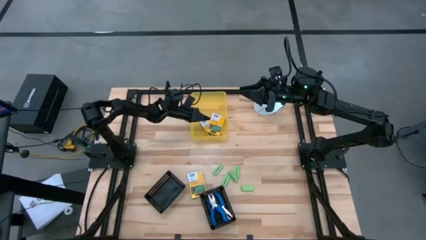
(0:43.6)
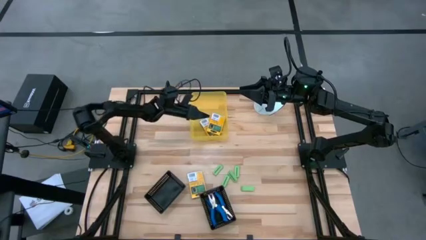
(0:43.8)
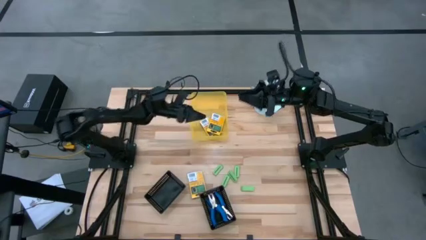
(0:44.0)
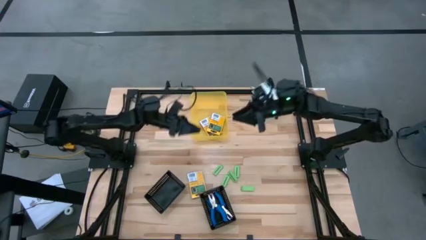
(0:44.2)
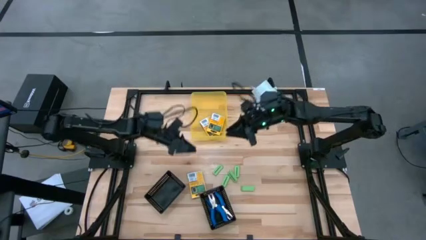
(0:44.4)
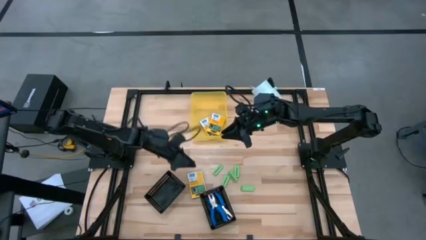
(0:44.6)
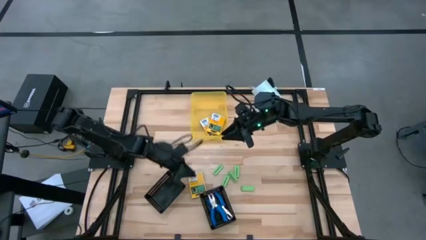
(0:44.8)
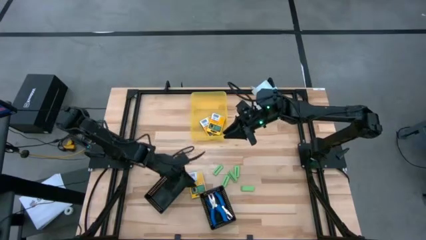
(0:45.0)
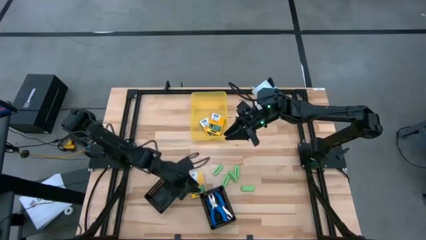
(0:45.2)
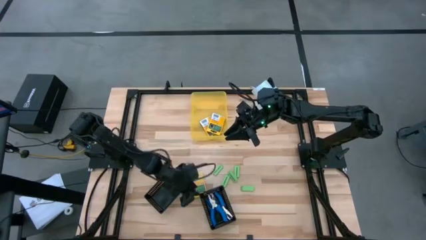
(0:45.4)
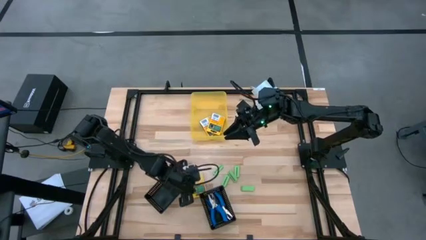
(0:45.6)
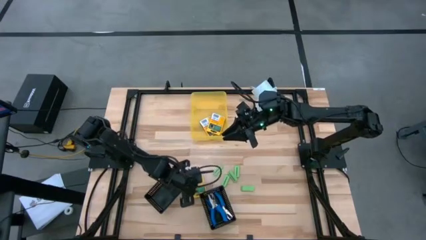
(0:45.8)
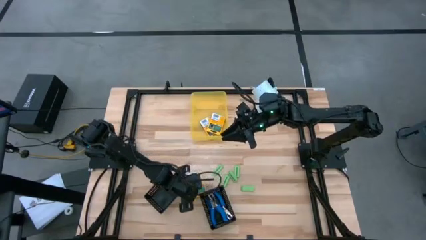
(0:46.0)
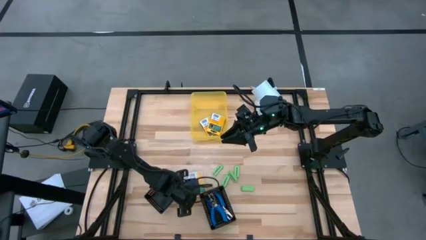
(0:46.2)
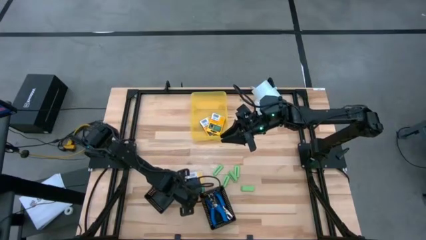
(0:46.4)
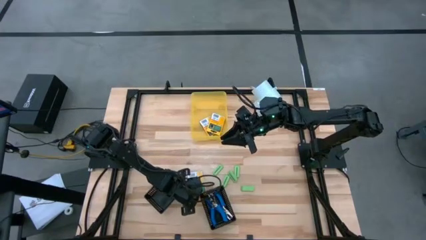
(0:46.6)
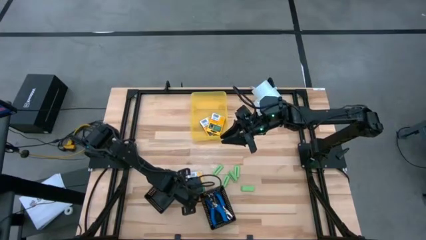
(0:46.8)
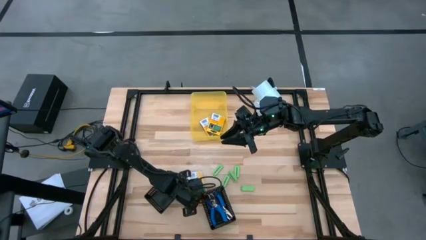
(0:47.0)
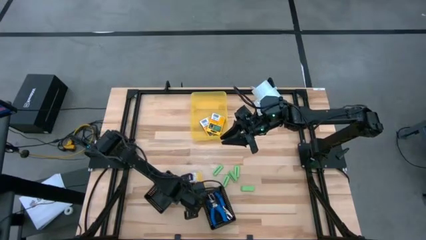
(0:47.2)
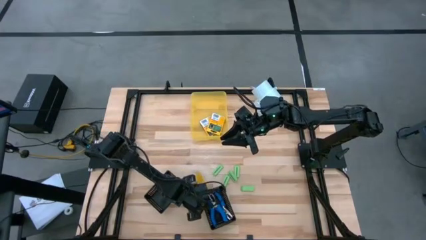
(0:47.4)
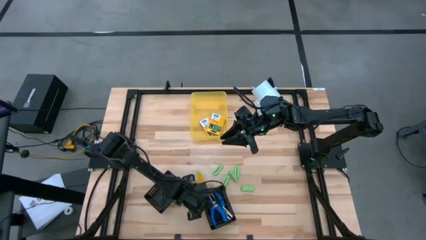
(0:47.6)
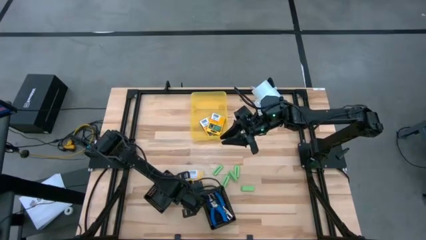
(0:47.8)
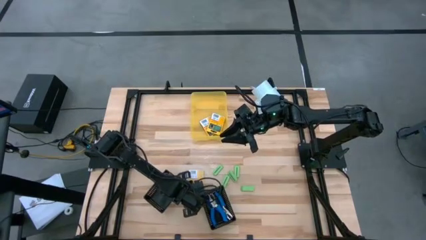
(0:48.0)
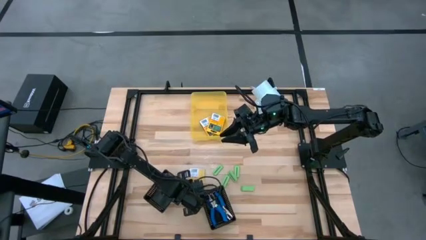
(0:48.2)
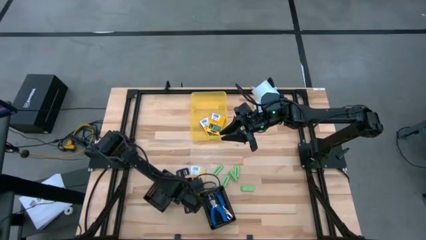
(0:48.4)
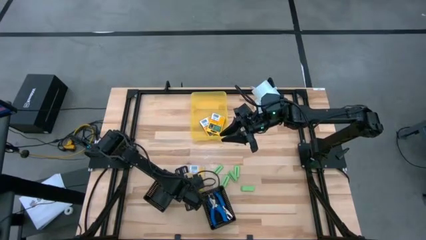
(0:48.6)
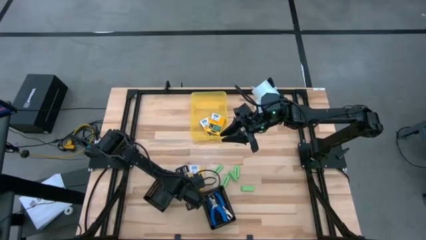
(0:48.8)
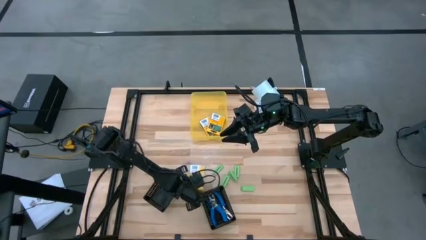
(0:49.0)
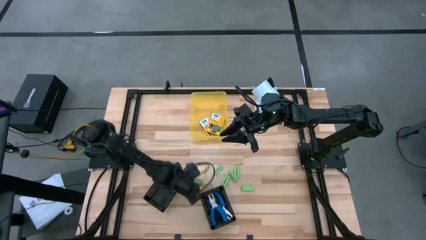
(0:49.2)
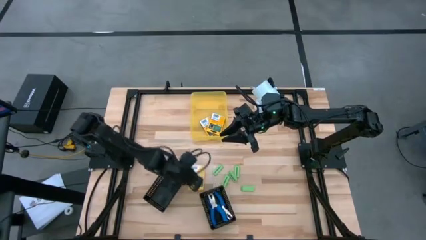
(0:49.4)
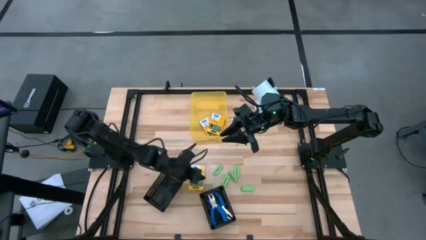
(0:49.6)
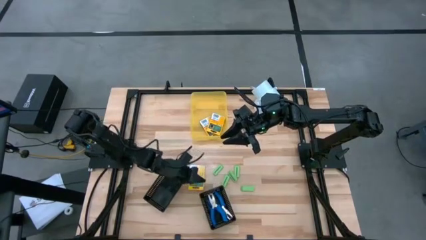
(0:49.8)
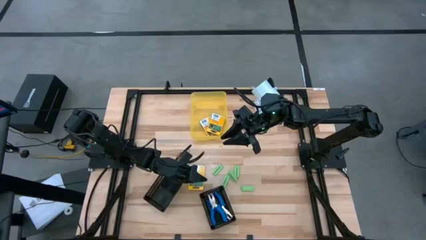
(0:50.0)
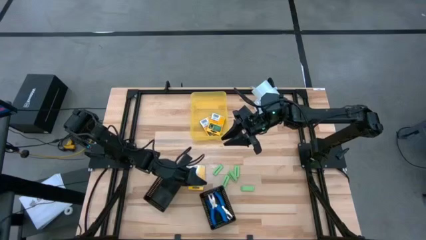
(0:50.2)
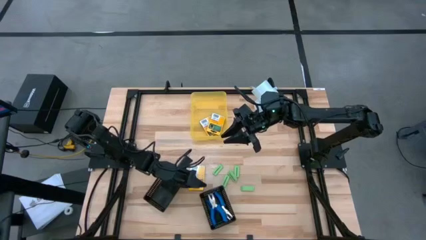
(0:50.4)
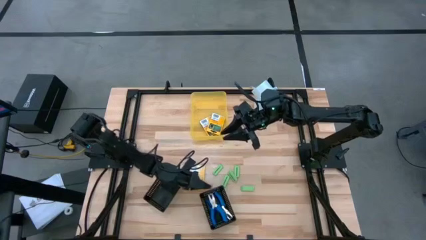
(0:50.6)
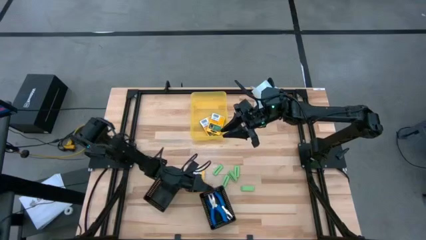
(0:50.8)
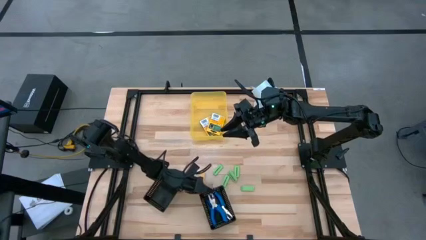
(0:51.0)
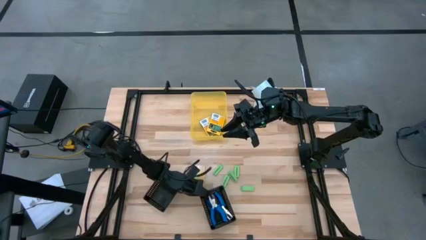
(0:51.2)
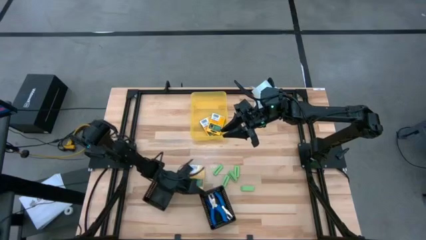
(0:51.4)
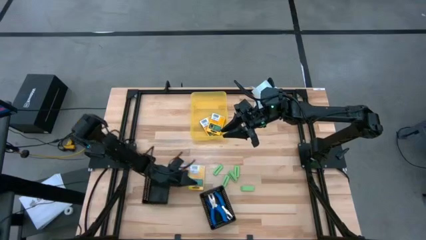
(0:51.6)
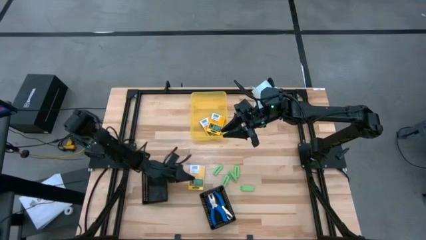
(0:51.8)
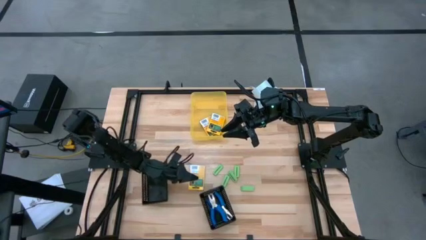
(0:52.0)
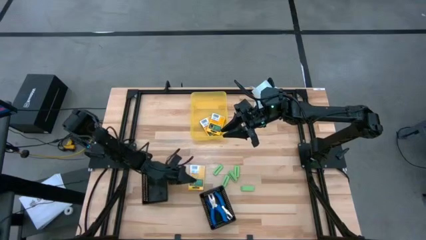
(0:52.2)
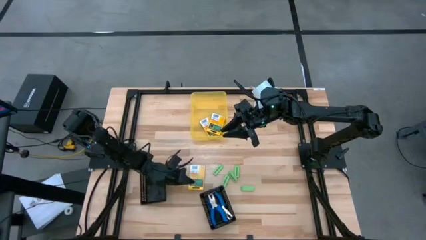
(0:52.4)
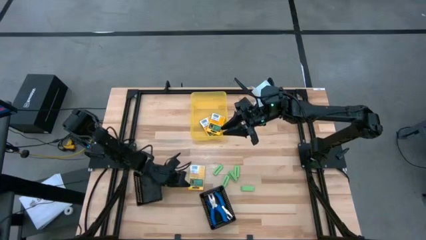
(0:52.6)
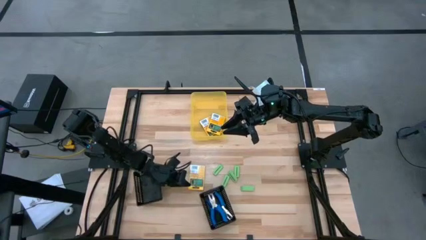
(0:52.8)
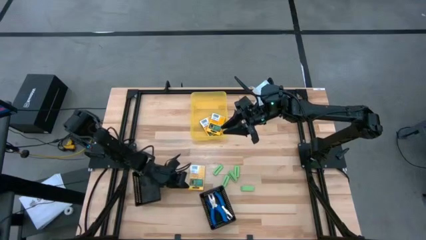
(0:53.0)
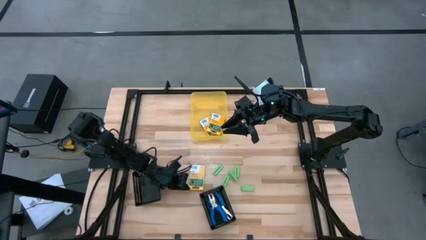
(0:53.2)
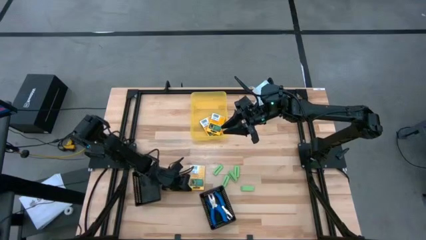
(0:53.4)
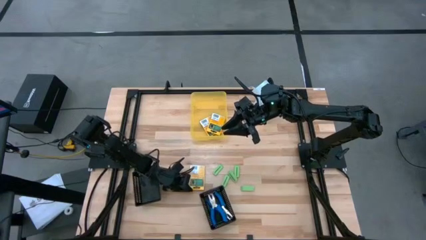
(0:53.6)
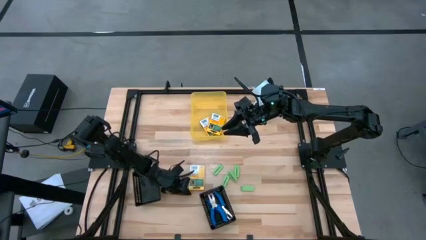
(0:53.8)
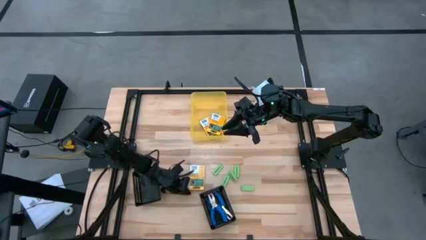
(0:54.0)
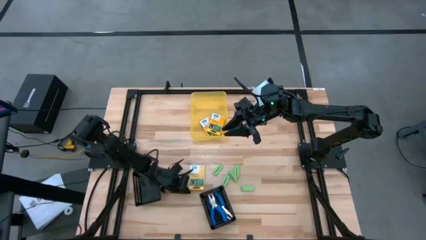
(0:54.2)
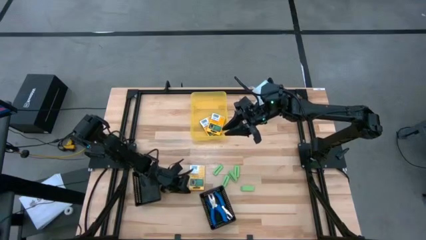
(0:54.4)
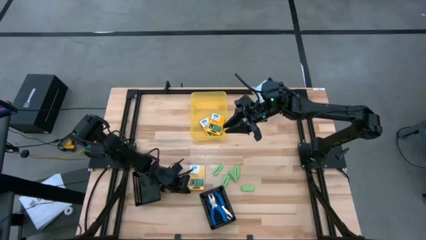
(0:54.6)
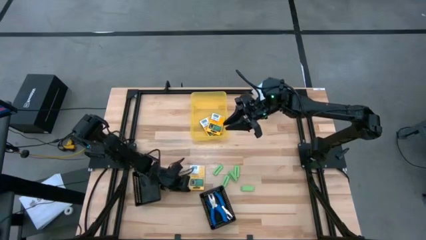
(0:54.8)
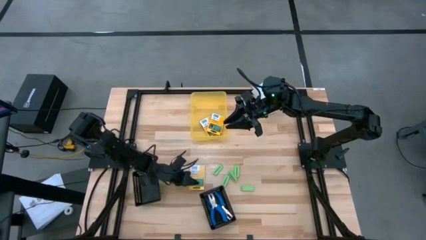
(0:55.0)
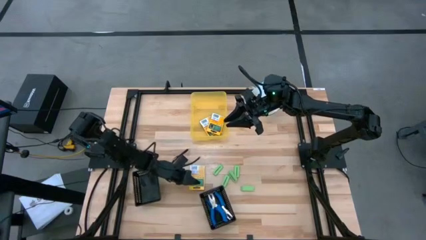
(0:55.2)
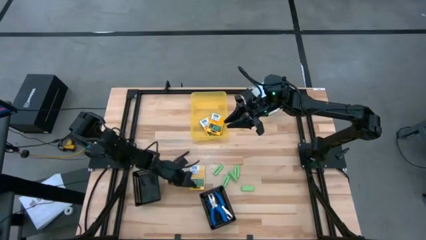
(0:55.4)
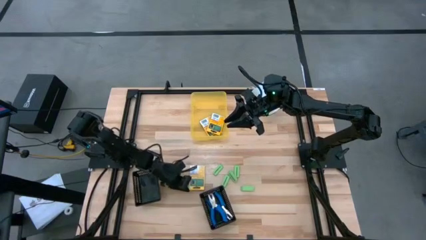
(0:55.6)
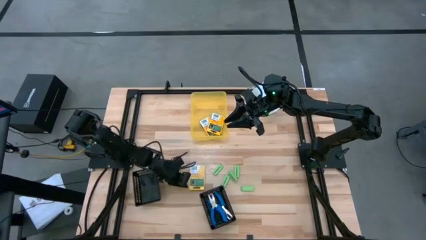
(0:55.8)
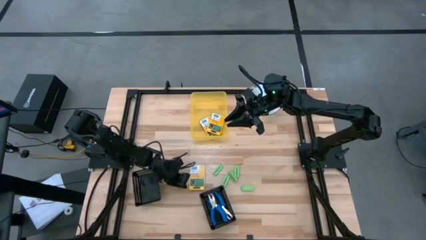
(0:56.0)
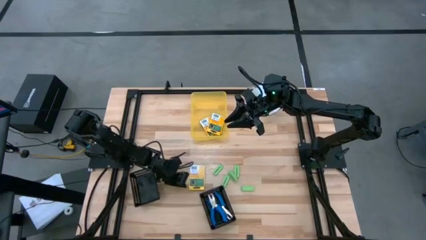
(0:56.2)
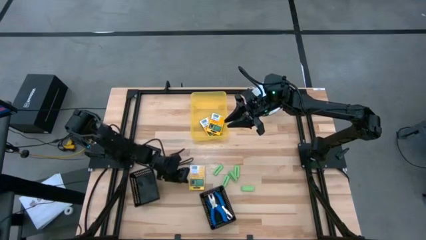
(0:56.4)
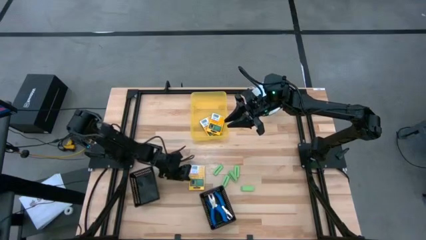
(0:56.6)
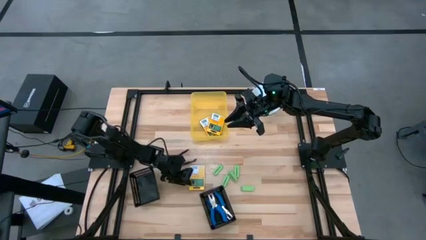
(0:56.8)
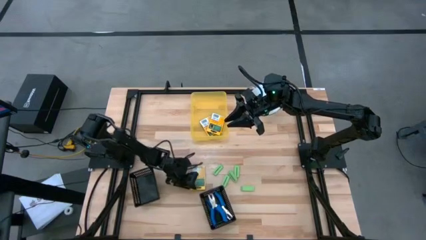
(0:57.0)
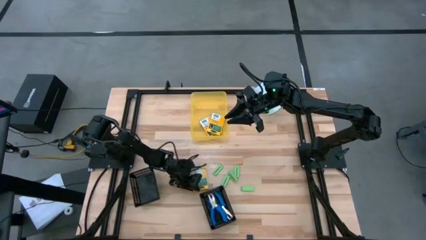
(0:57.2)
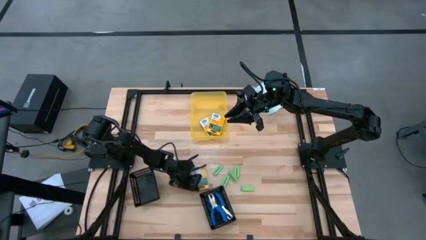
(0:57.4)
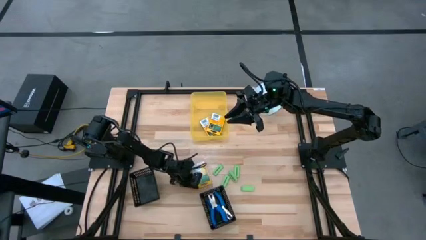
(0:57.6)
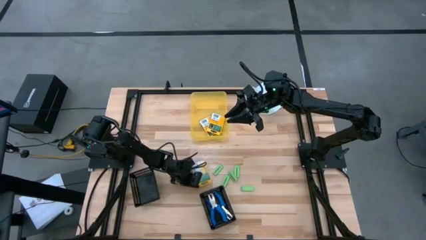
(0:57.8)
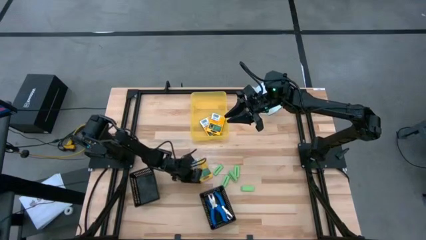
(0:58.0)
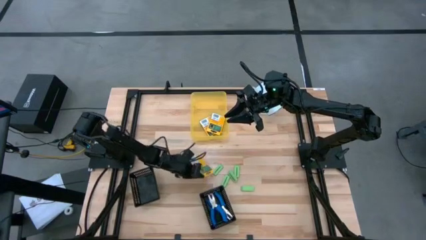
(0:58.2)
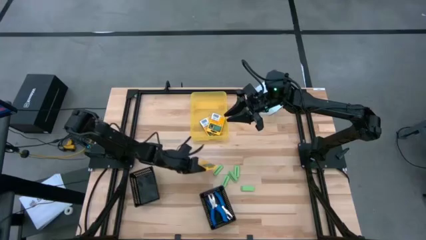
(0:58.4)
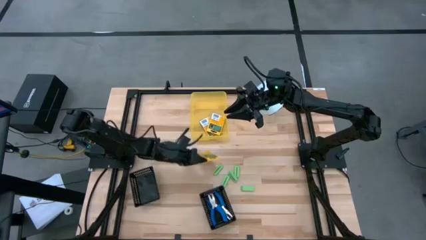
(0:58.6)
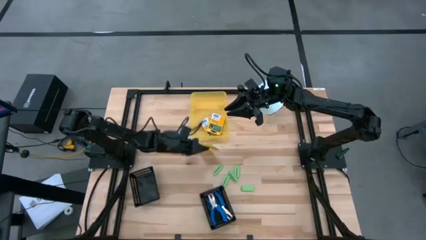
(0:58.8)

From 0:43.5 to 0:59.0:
Task: Pick & Place School Supplies
Put the box of crayon into the yellow bin
